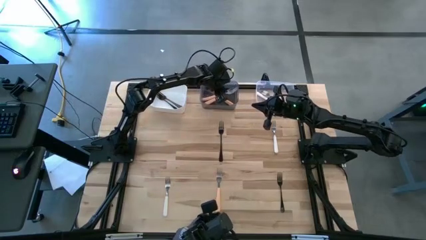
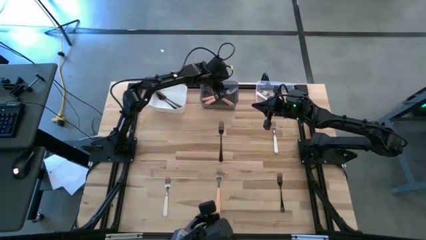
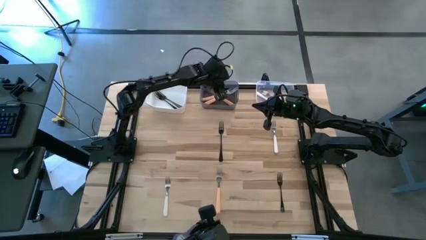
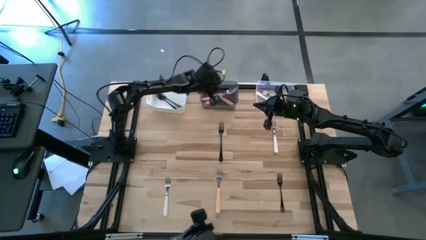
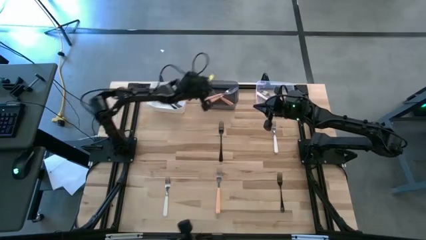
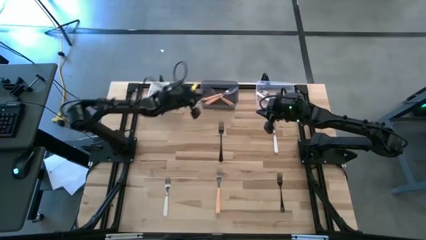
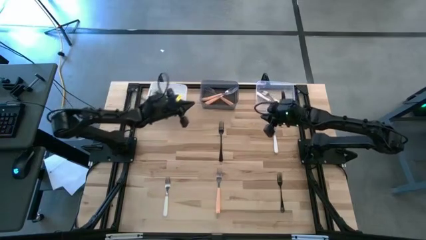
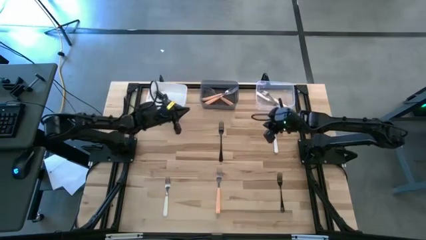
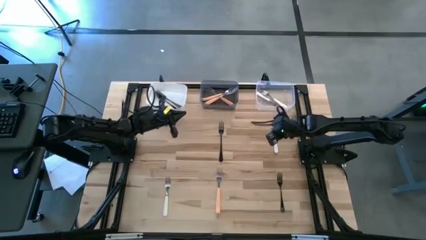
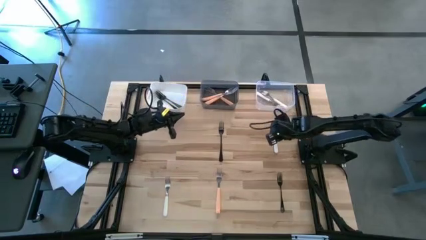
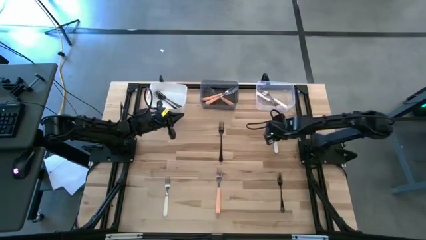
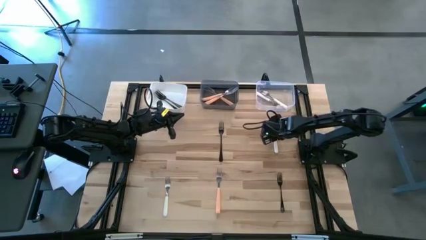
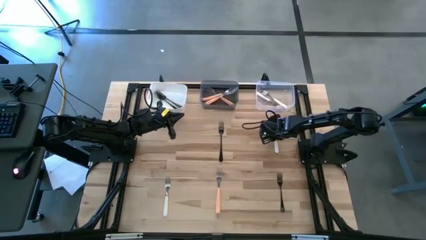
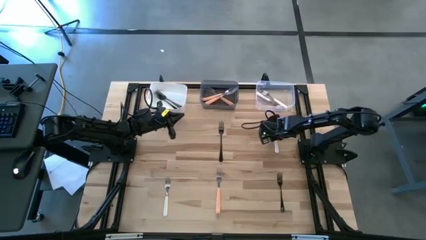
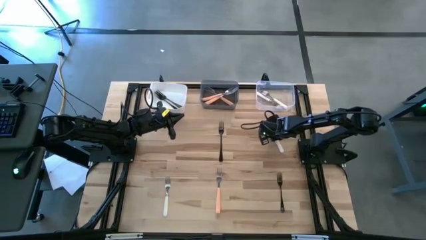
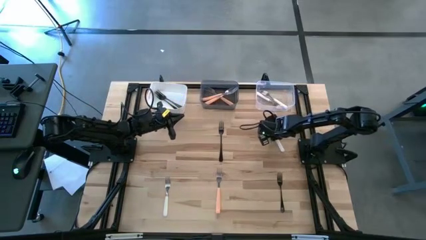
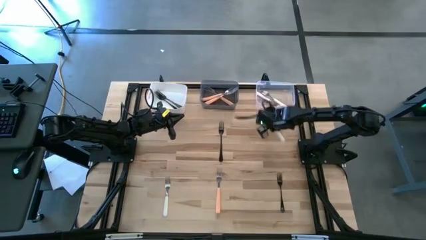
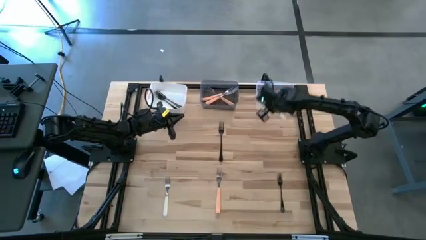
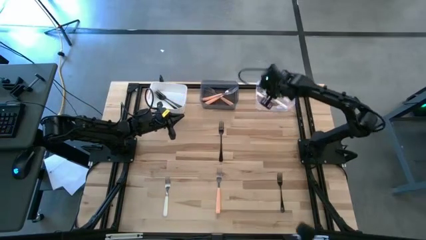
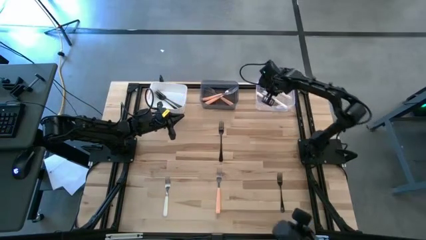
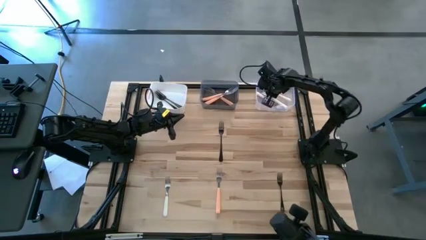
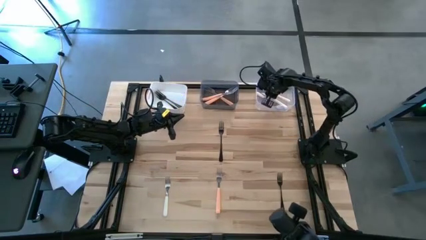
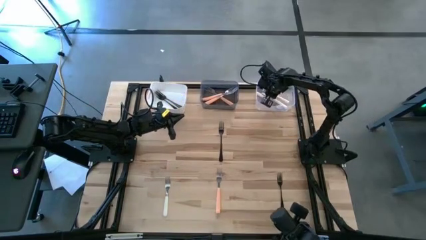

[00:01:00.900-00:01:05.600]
Task: Sort silverware by color (type)
Put the top white fork into the transparent bin

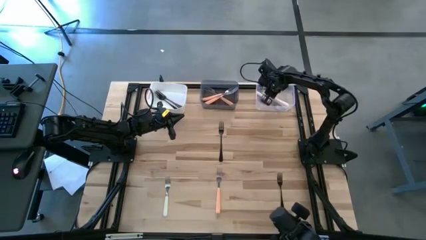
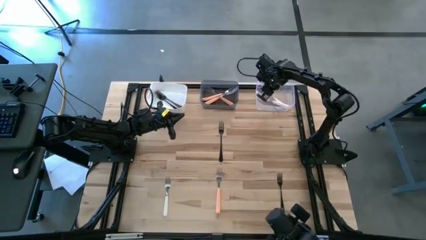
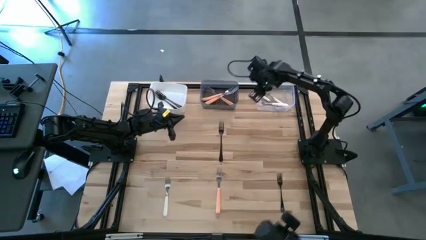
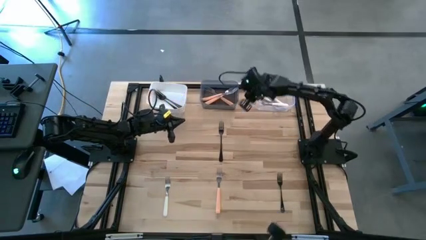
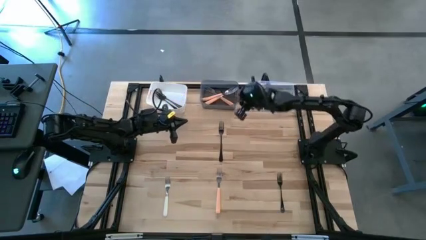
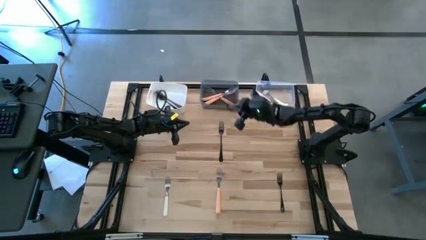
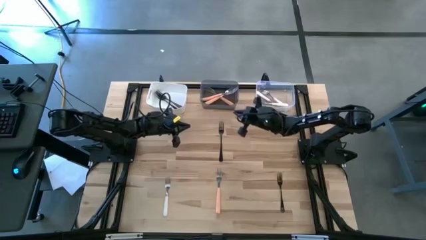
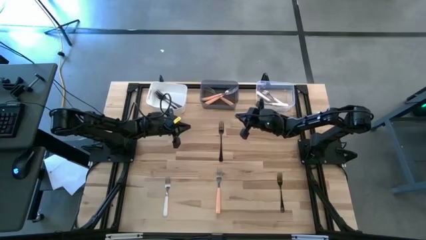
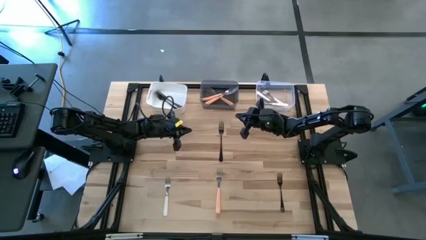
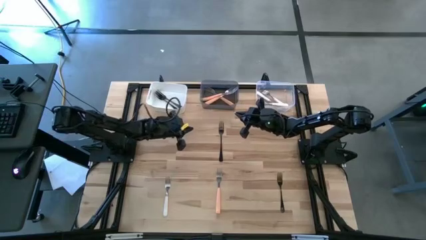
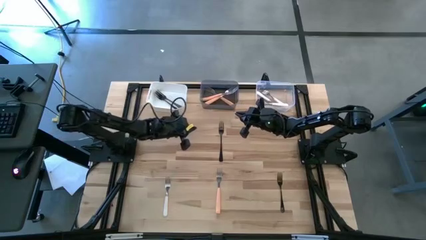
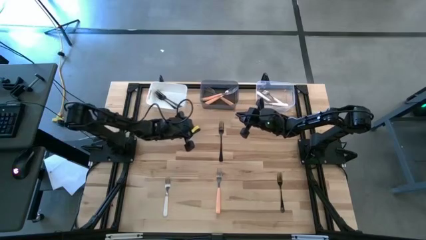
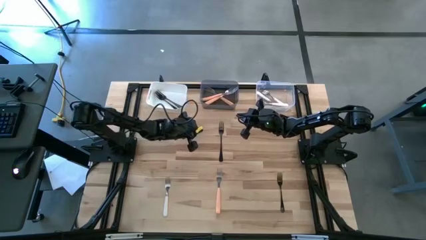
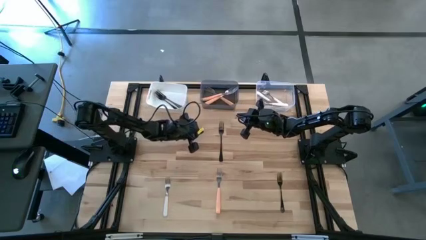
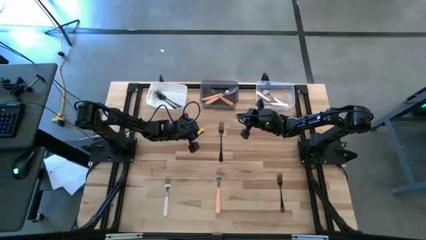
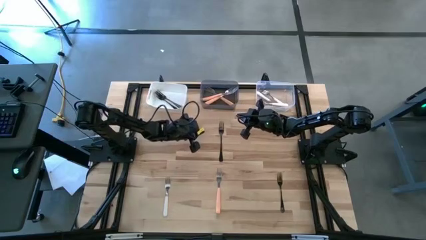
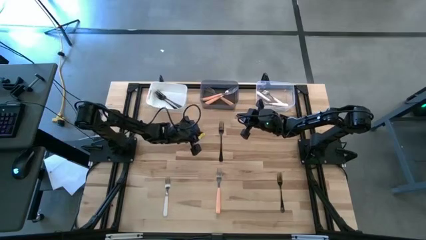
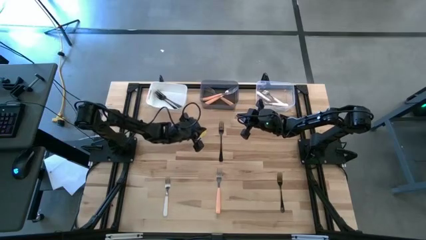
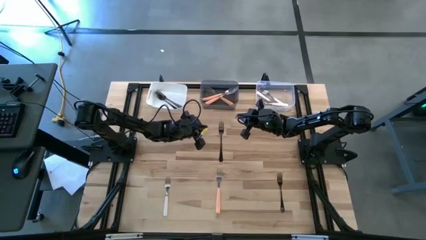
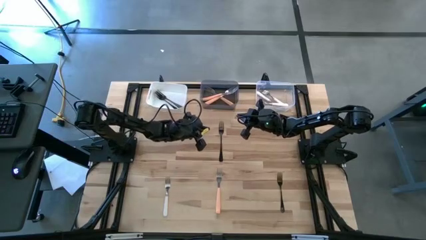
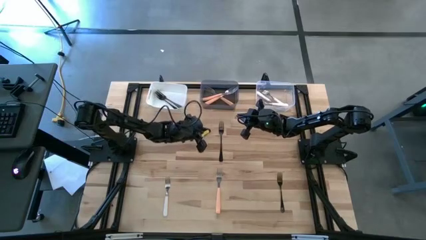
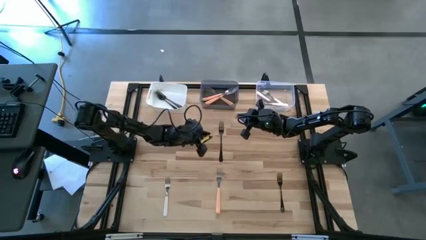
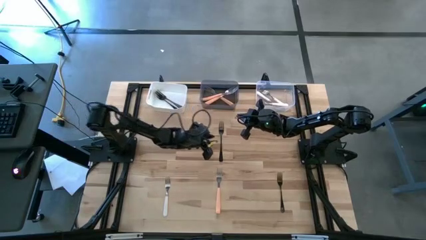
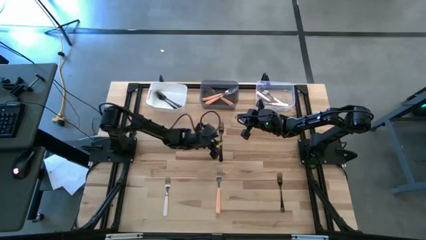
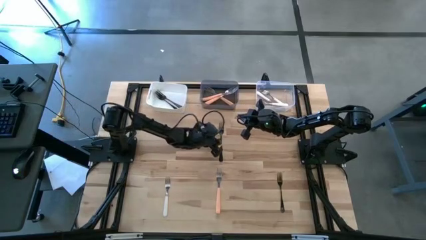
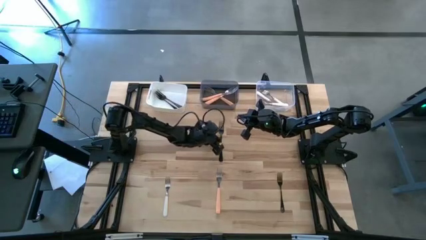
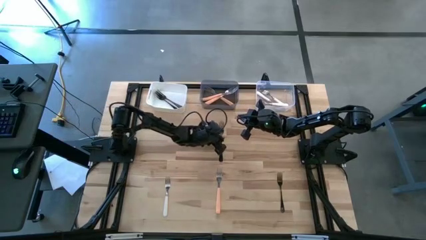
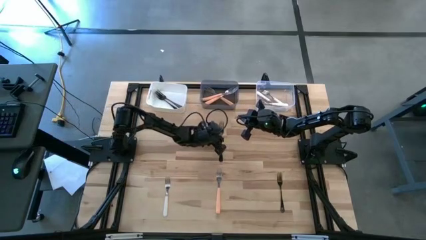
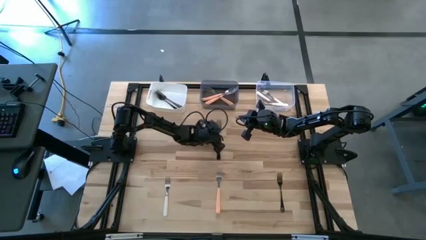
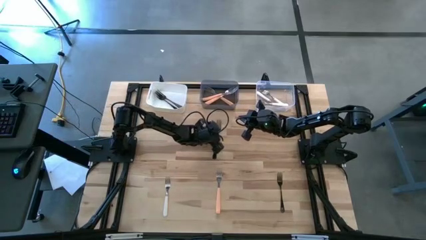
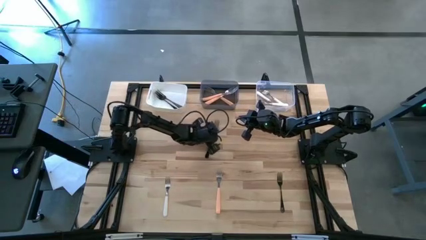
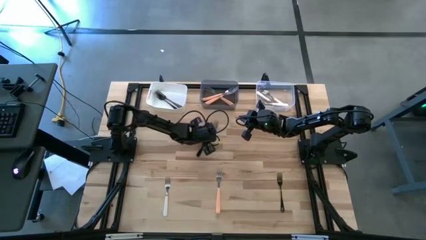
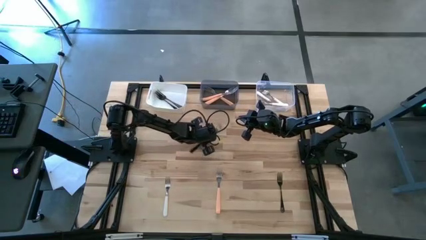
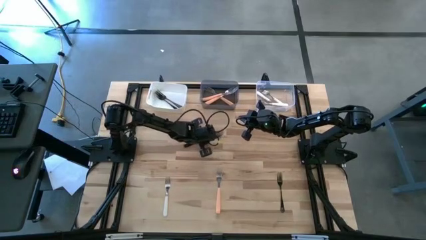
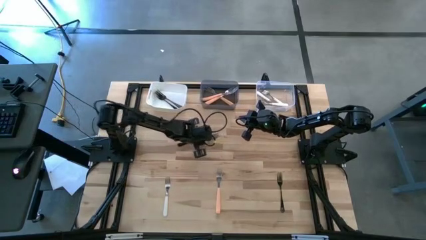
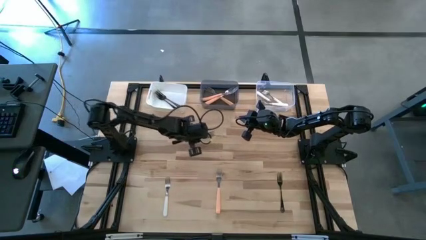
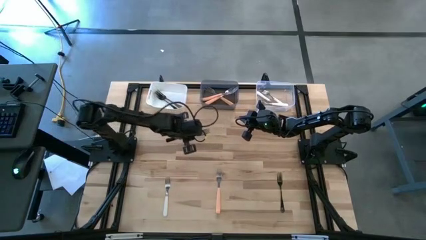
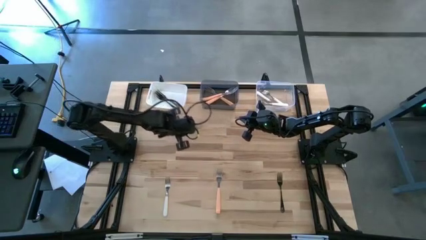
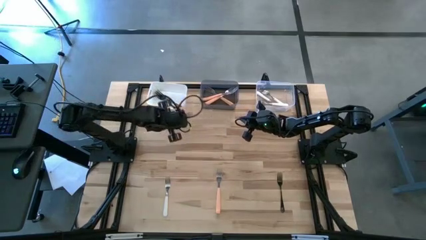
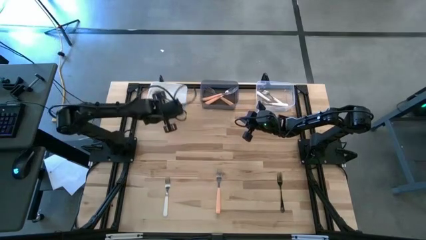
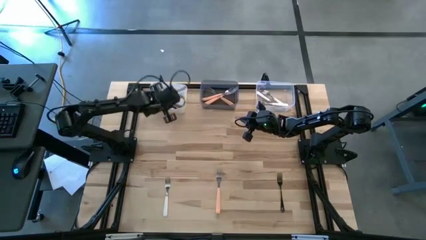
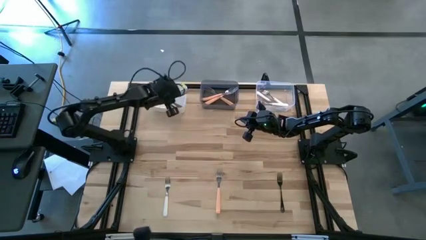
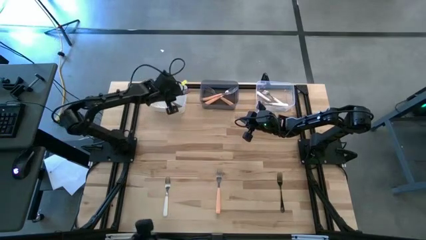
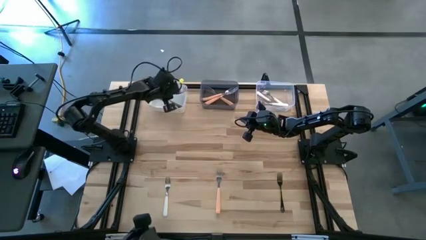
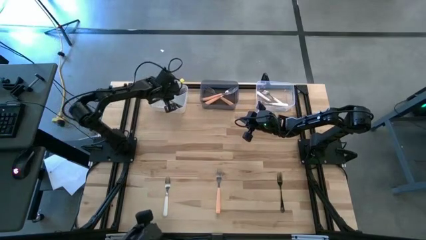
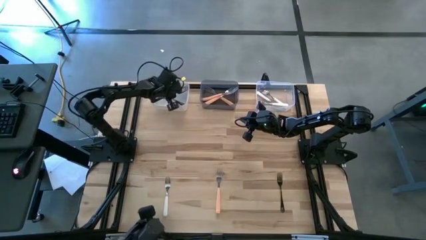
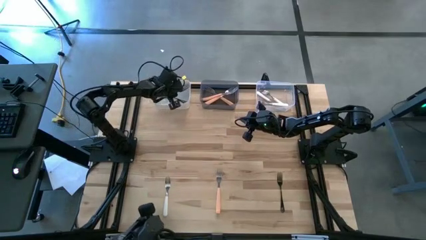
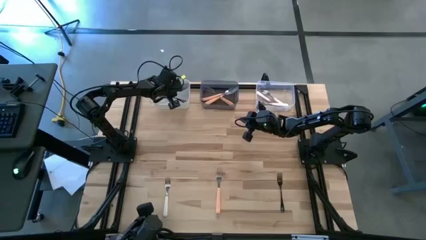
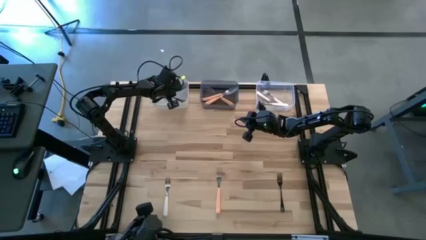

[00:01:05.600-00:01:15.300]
Put the top black fork into the white bin
